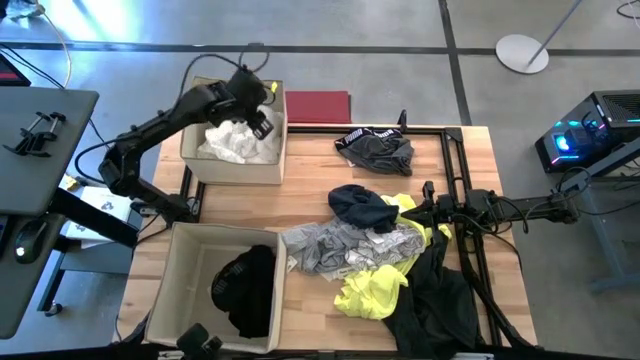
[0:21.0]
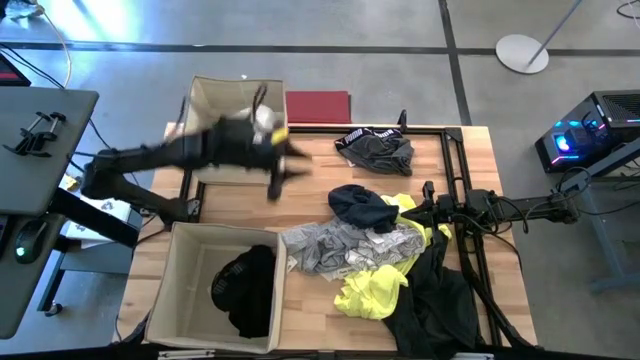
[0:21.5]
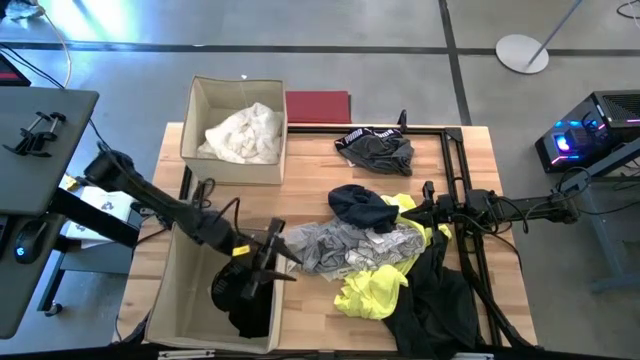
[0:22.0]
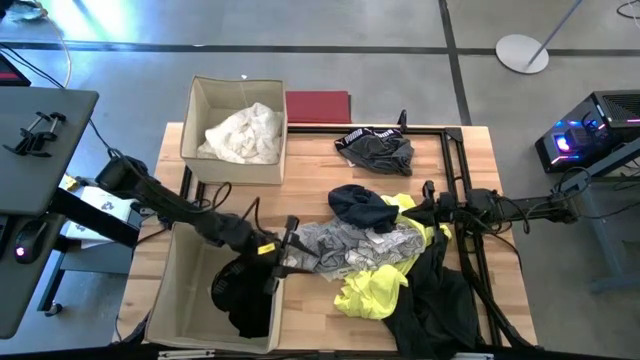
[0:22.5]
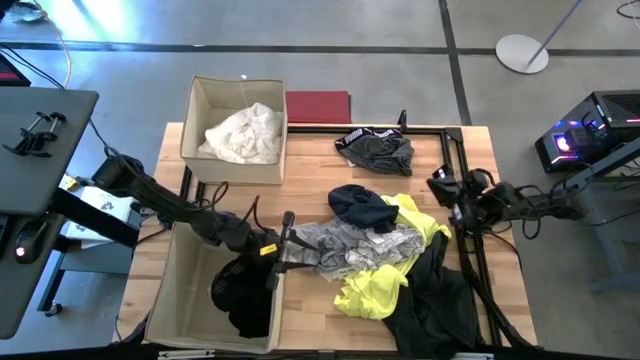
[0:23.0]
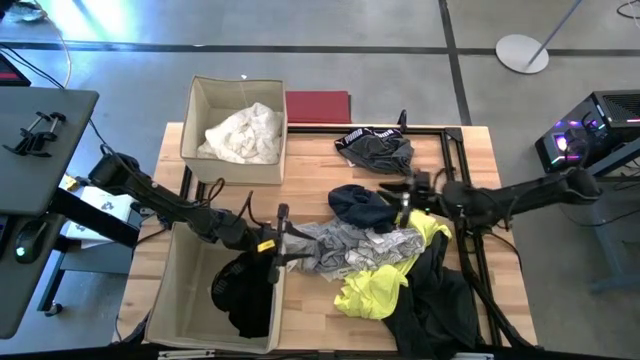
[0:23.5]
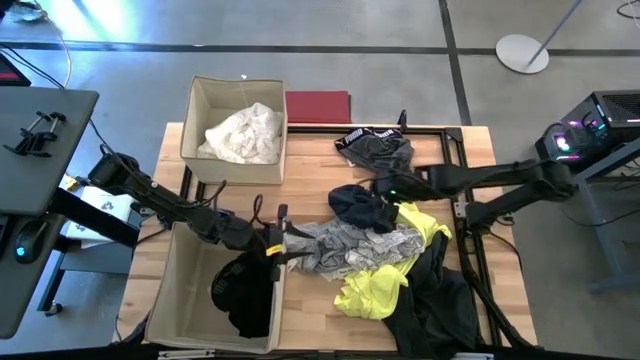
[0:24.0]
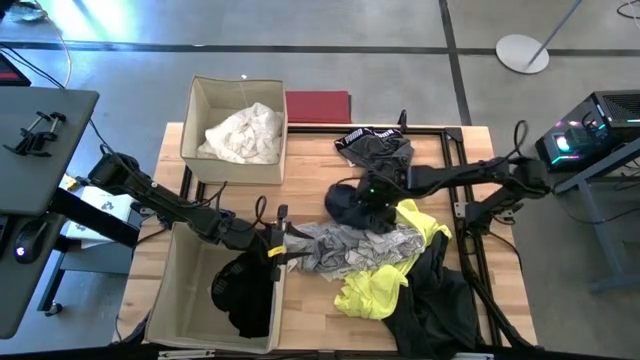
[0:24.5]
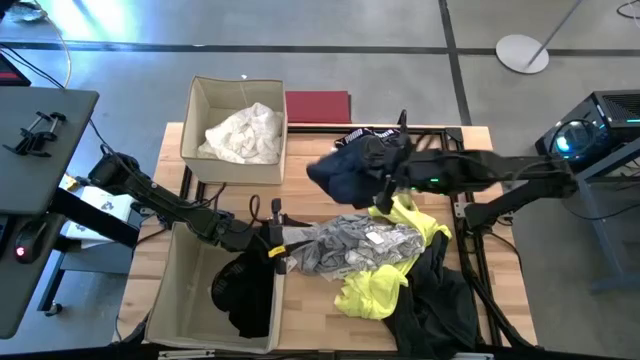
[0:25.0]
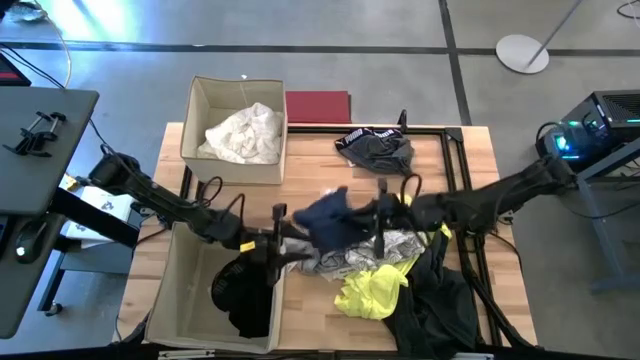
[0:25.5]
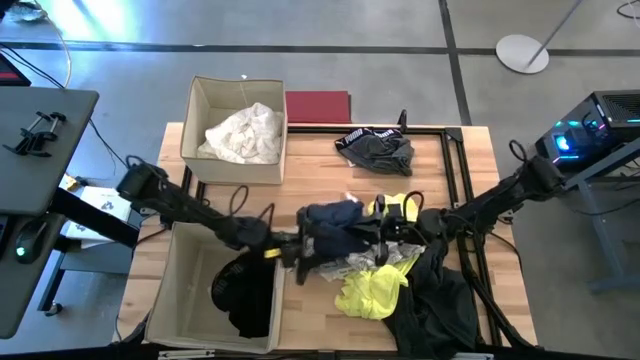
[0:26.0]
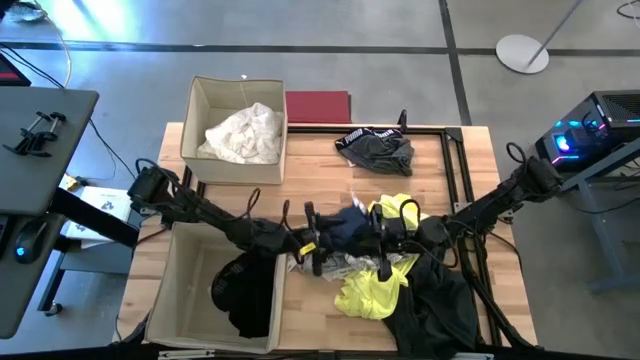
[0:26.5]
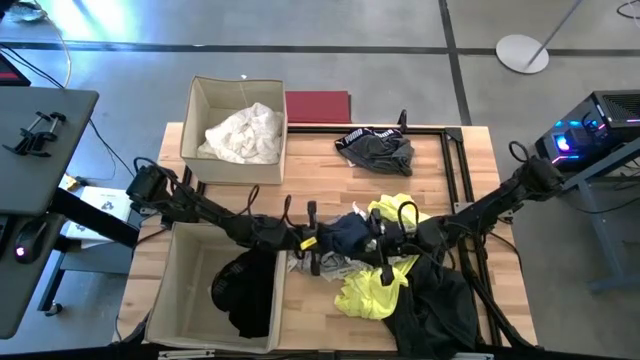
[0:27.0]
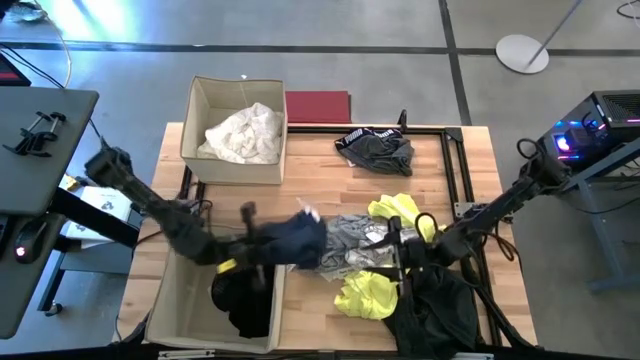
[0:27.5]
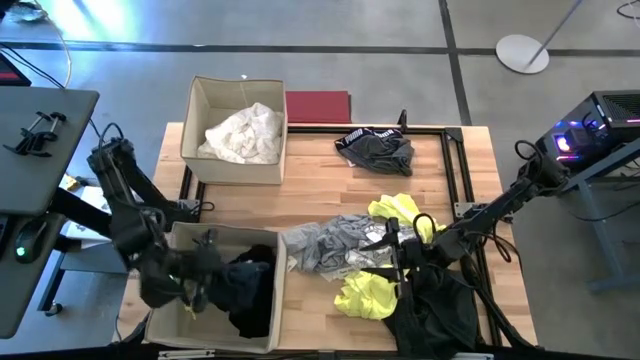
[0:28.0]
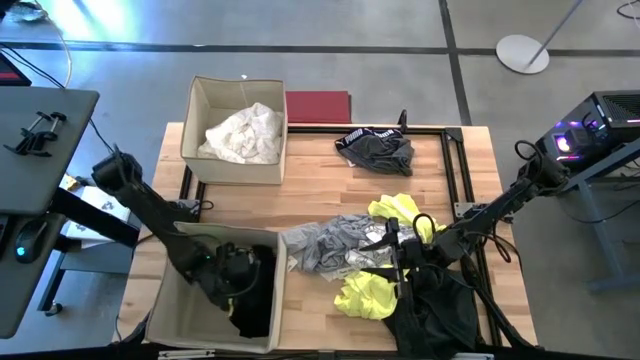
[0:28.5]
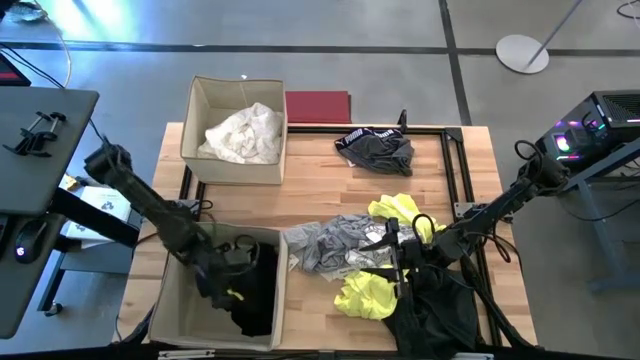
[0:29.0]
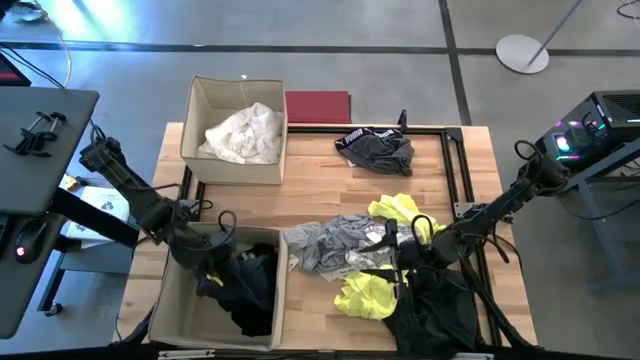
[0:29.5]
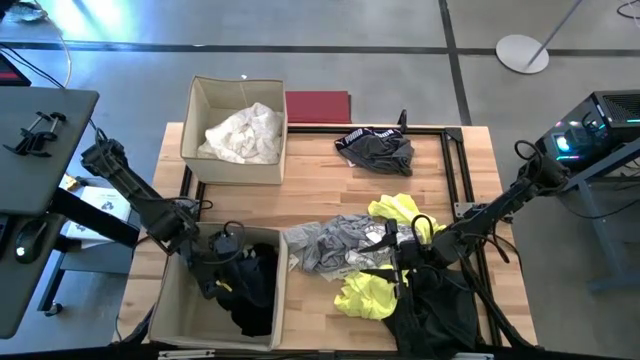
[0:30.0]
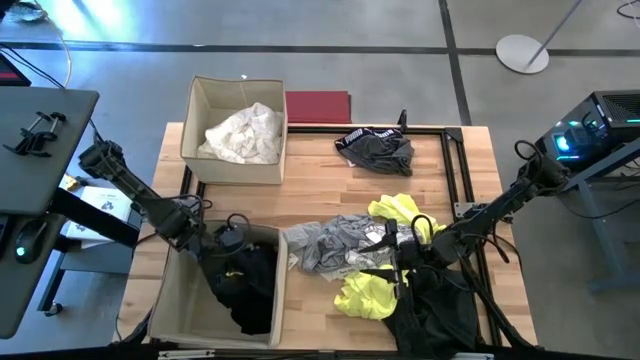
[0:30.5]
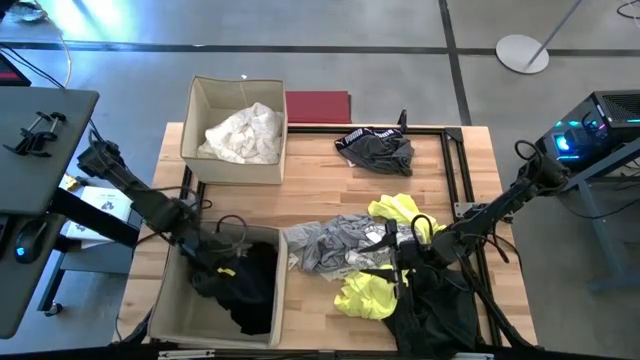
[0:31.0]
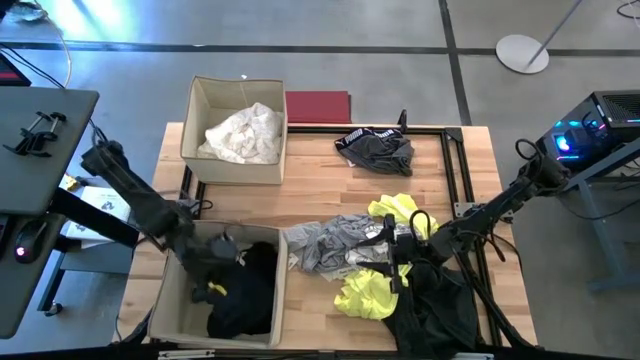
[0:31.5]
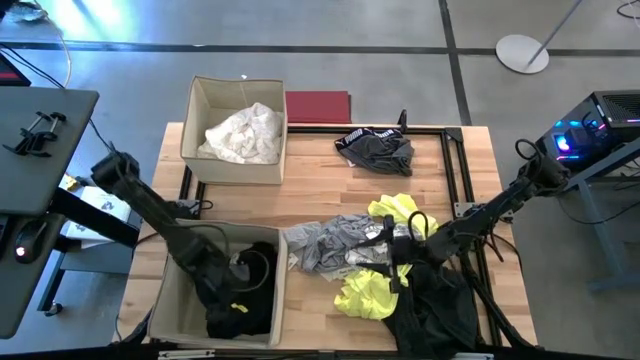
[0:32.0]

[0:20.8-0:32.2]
Task: Sort clothes
Put the blue shorts into the bottom laundry organizer

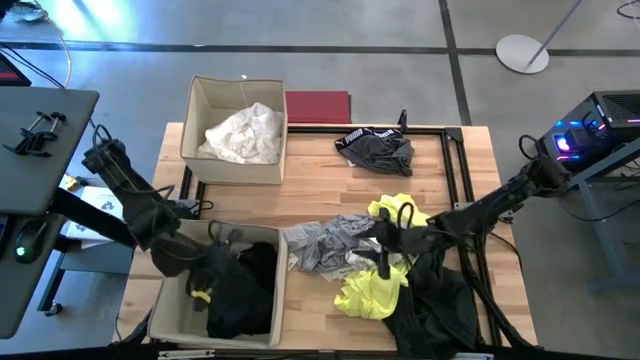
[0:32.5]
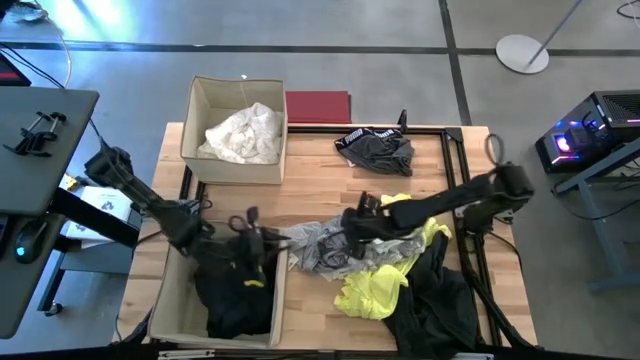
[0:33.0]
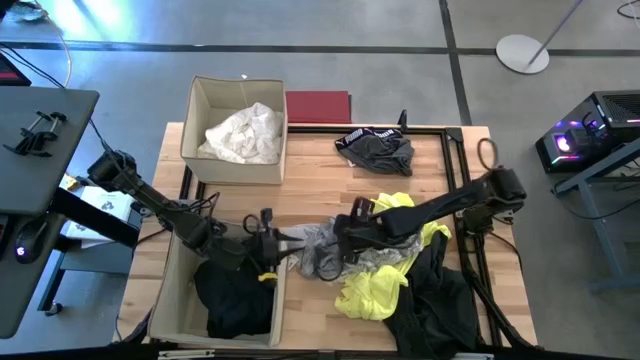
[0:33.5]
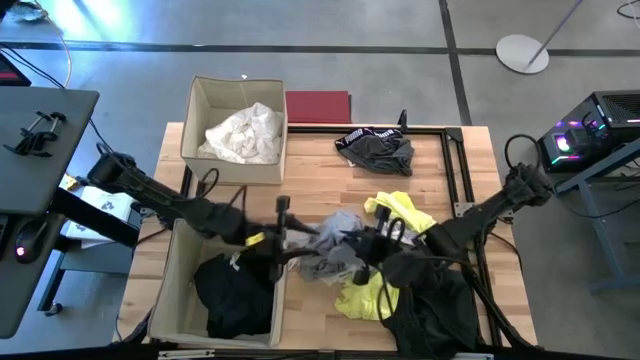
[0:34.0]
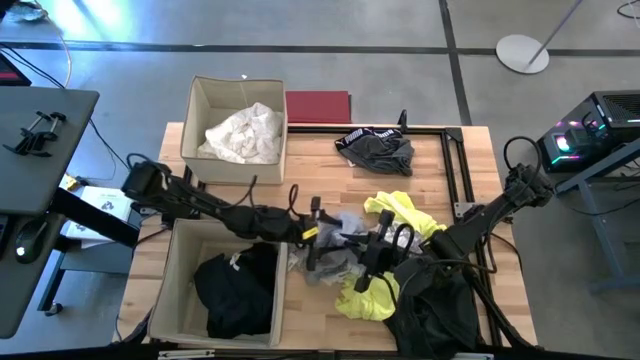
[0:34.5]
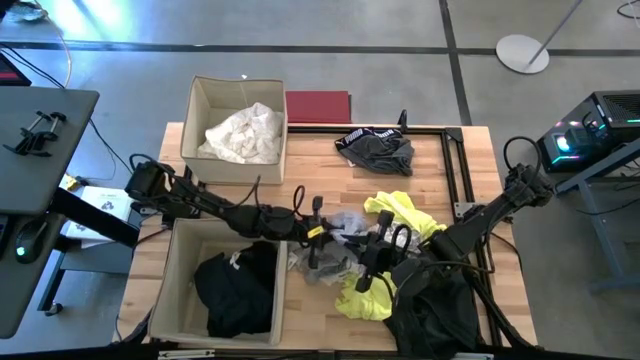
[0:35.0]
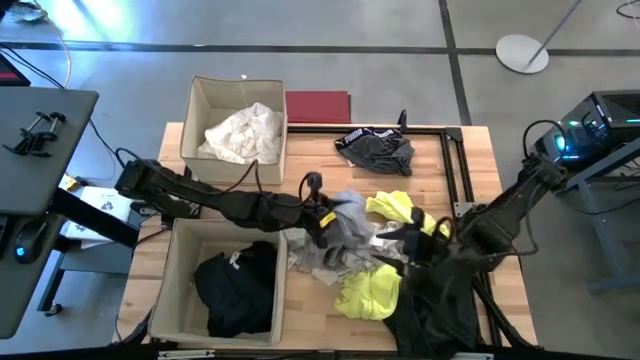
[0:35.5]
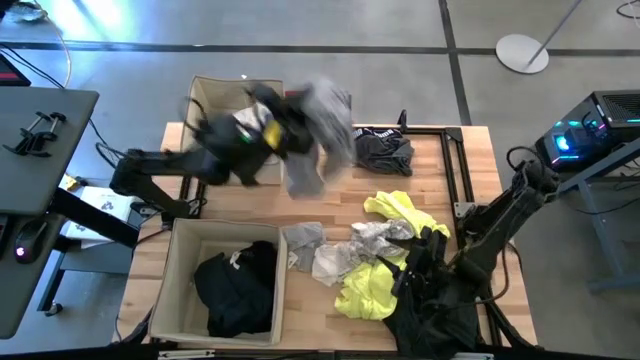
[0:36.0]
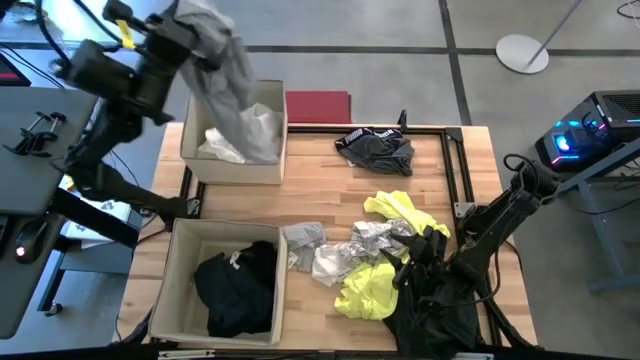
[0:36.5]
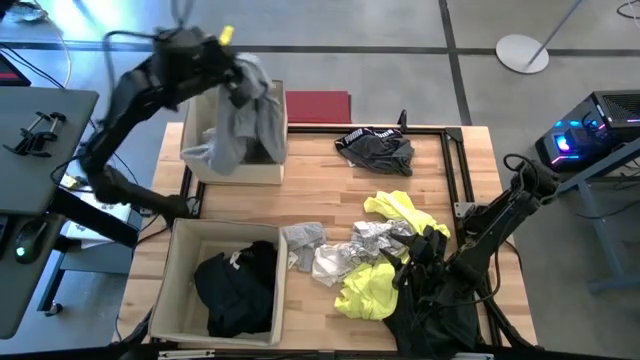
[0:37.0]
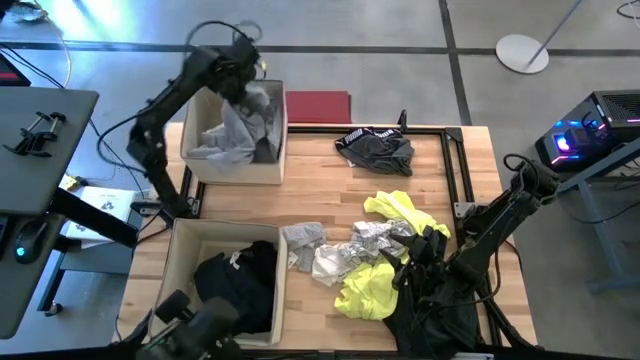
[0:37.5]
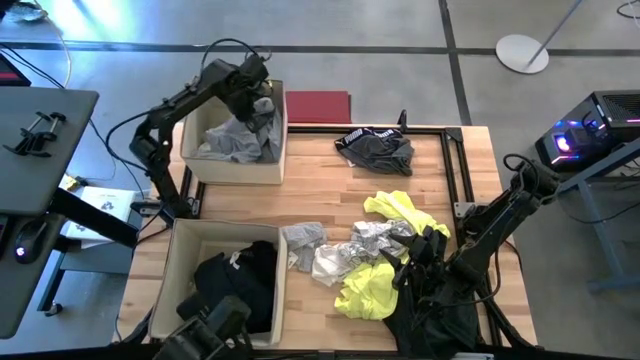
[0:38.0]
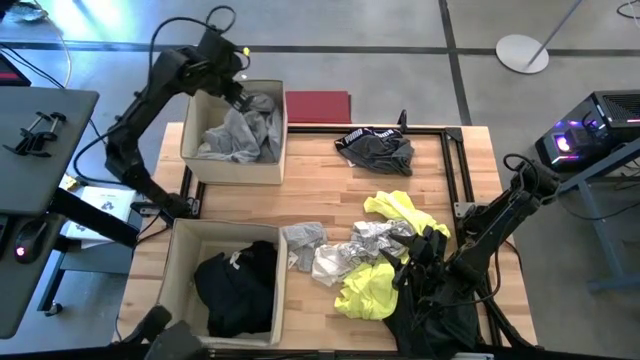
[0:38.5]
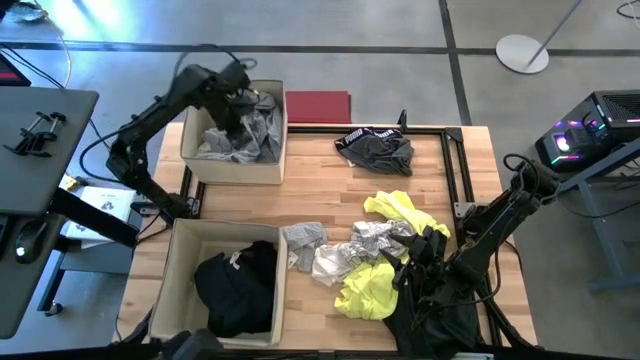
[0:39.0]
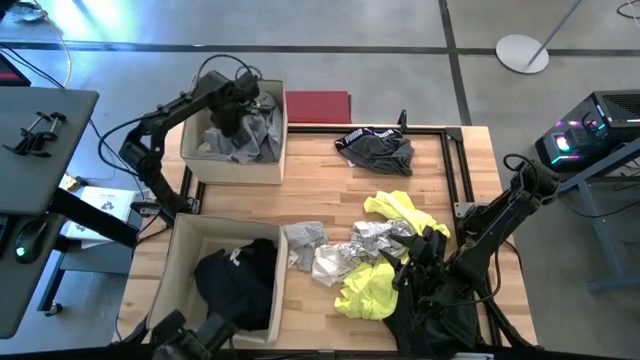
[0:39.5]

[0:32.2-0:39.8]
Put the gray shirt into the top laundry organizer

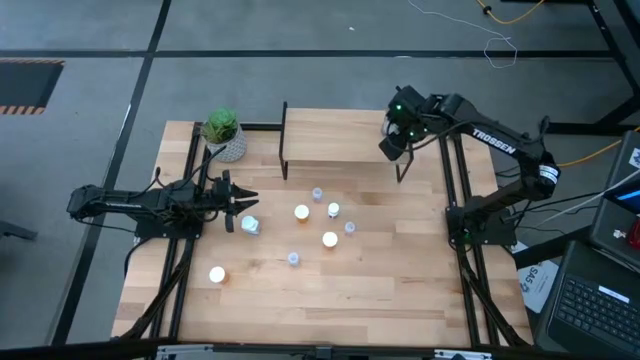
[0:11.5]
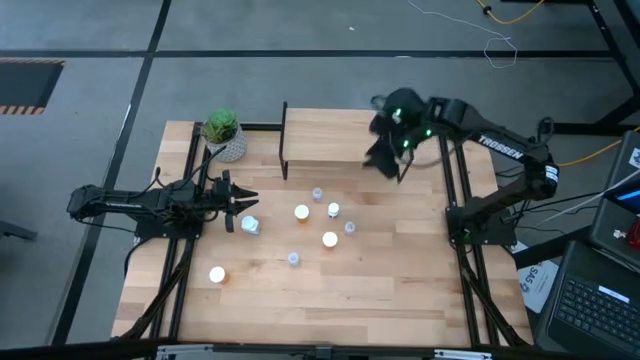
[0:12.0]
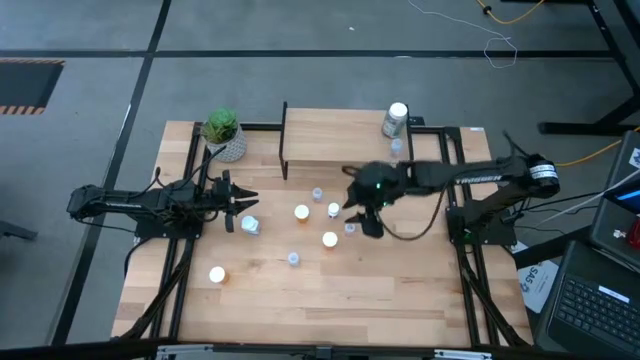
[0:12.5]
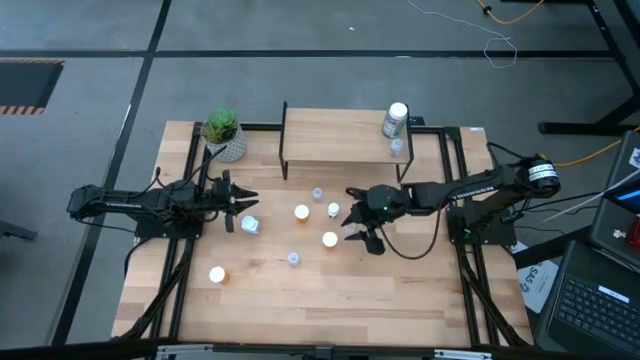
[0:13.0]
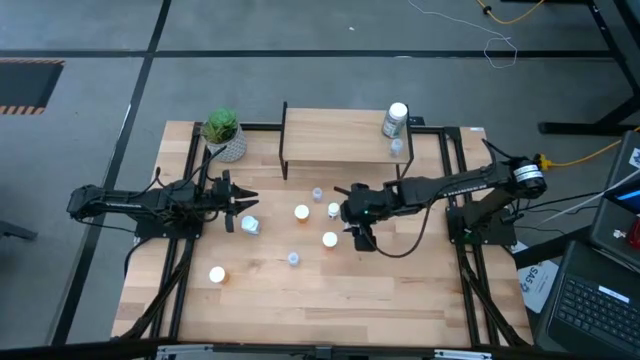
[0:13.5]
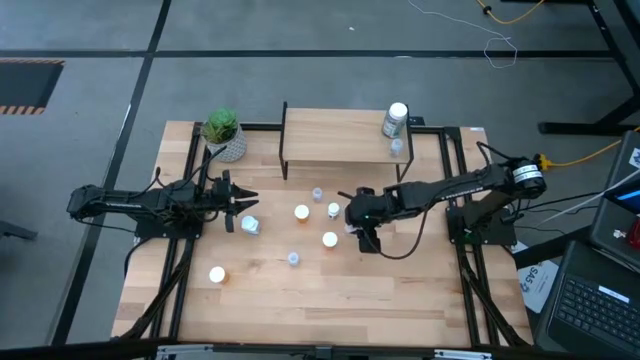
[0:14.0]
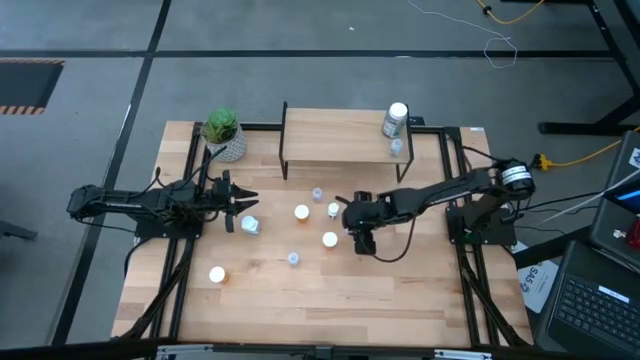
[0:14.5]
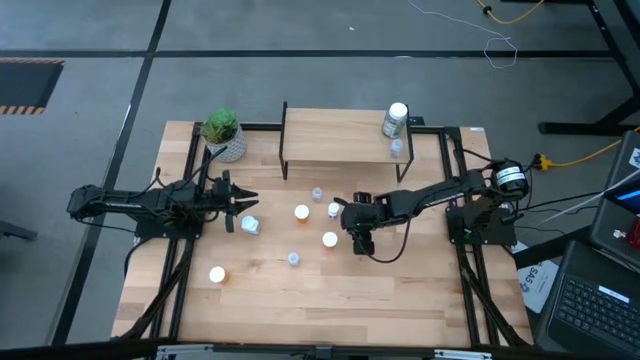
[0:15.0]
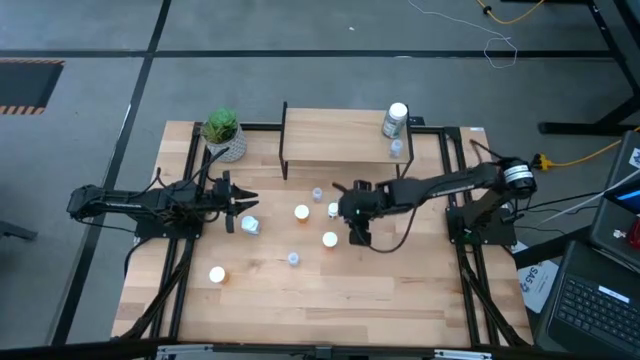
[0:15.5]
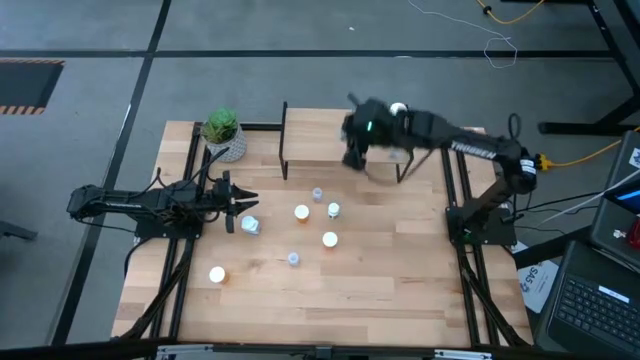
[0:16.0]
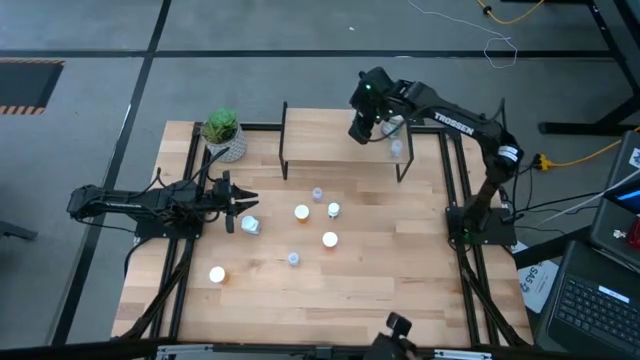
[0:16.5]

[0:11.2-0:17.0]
Task: Pick and place medicine bottles onto shelf by color
Put the transparent pill bottle on the shelf
